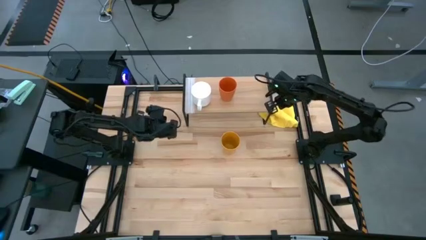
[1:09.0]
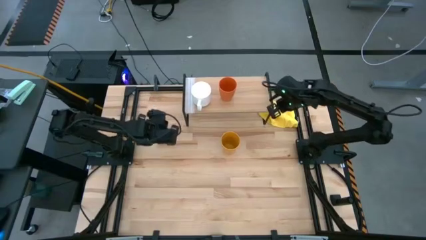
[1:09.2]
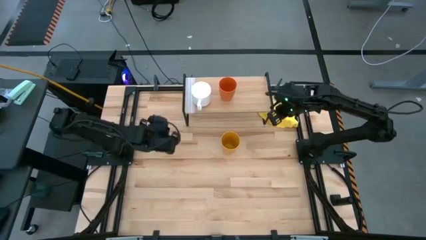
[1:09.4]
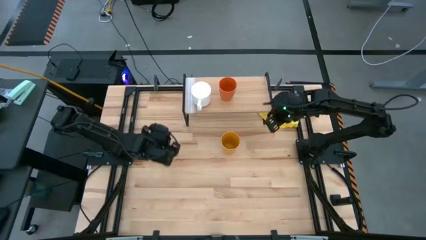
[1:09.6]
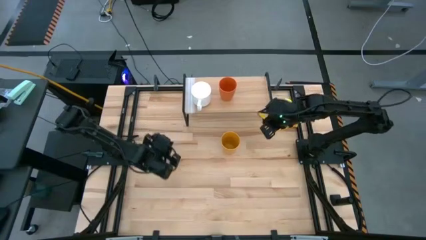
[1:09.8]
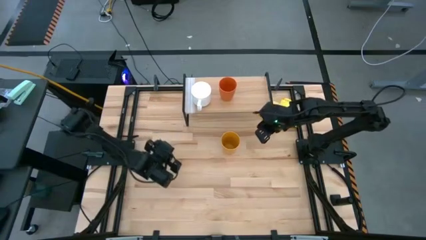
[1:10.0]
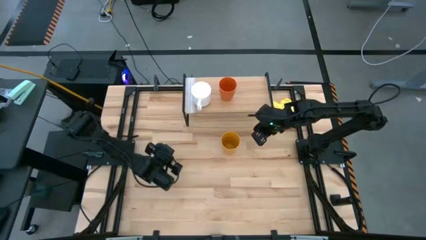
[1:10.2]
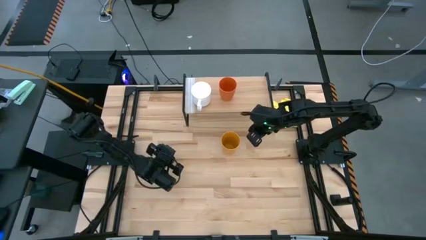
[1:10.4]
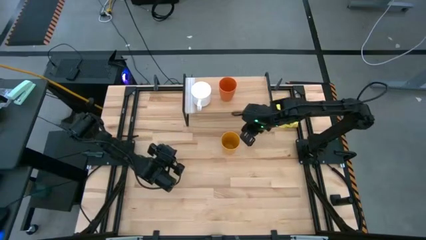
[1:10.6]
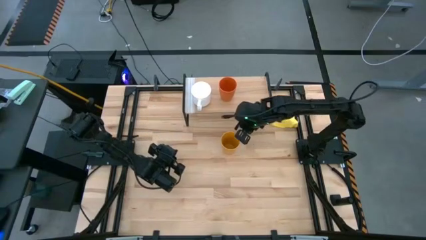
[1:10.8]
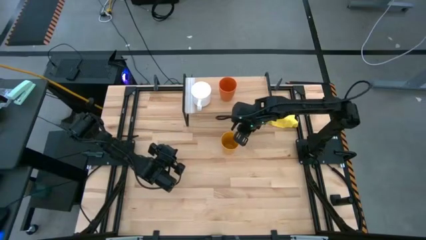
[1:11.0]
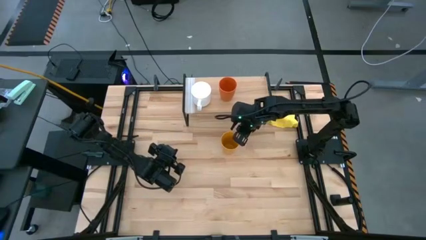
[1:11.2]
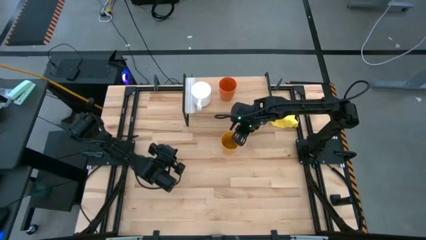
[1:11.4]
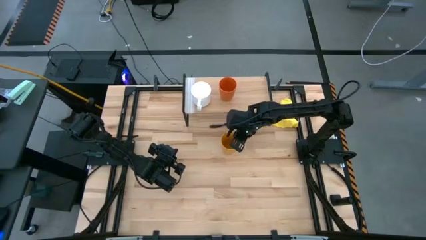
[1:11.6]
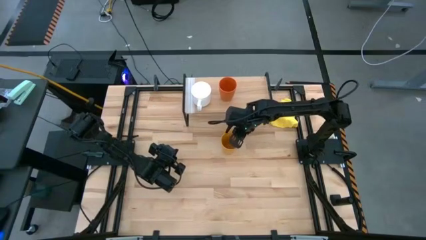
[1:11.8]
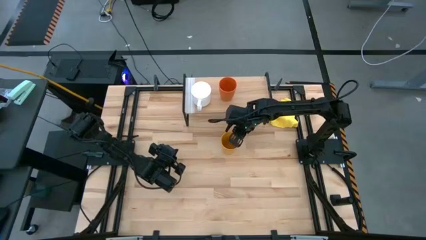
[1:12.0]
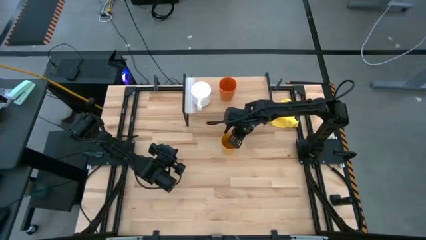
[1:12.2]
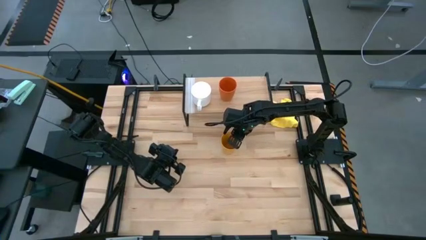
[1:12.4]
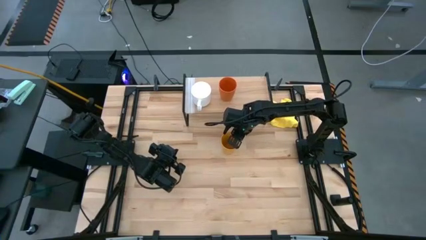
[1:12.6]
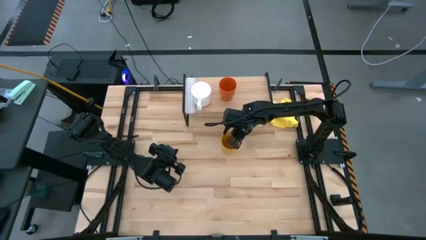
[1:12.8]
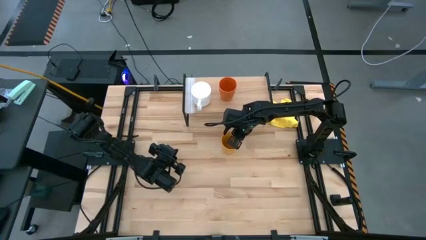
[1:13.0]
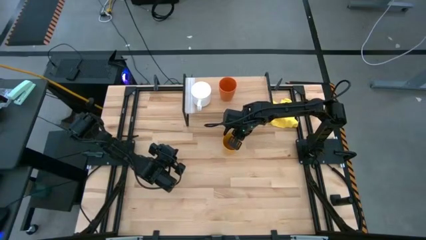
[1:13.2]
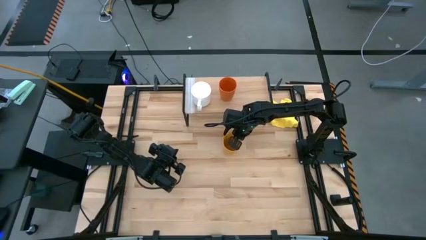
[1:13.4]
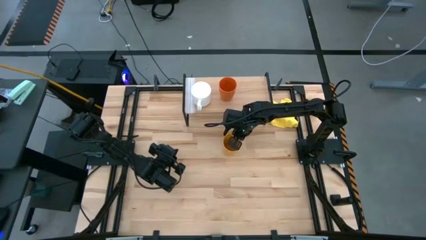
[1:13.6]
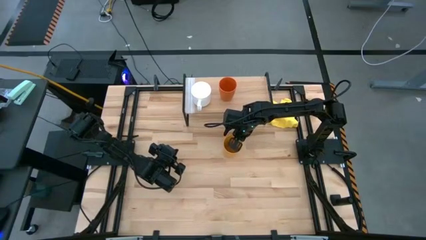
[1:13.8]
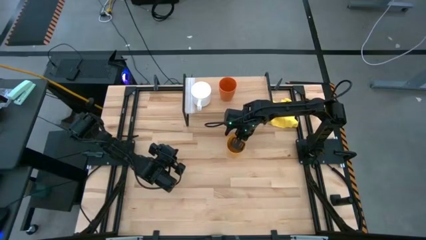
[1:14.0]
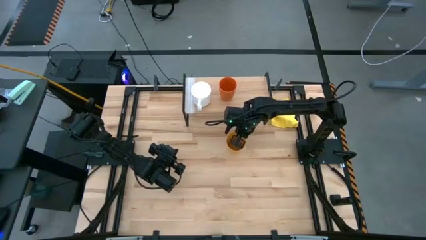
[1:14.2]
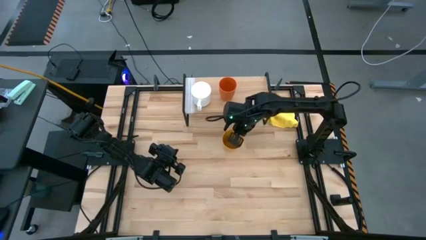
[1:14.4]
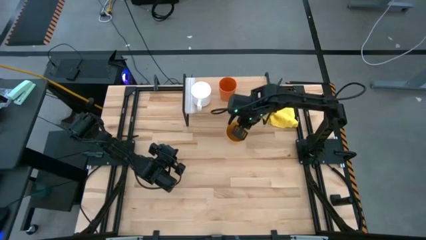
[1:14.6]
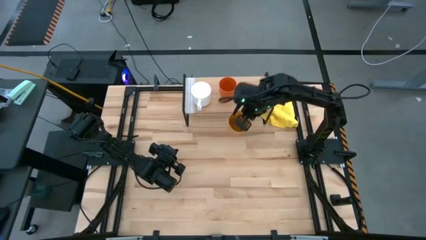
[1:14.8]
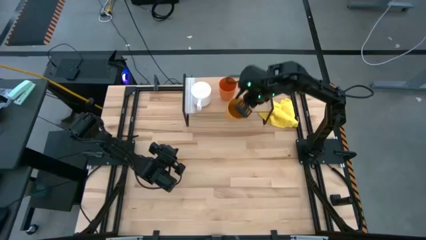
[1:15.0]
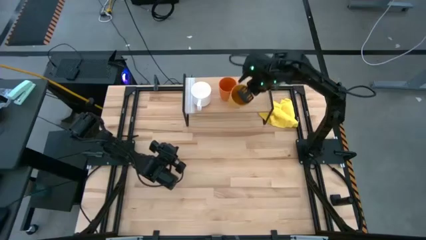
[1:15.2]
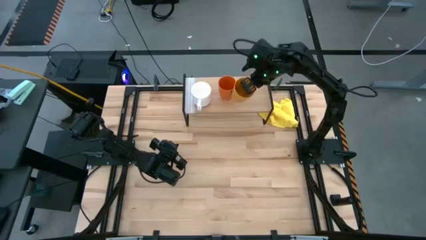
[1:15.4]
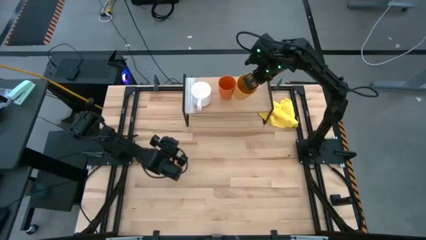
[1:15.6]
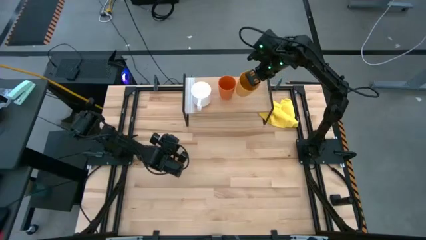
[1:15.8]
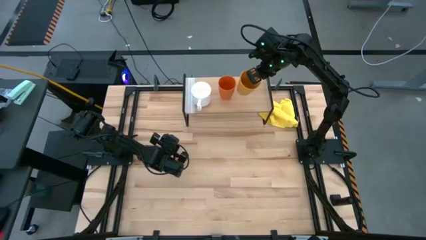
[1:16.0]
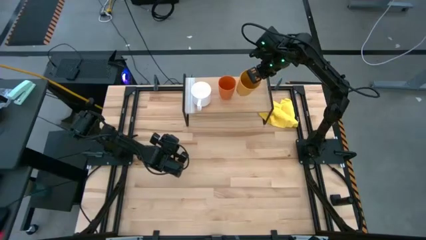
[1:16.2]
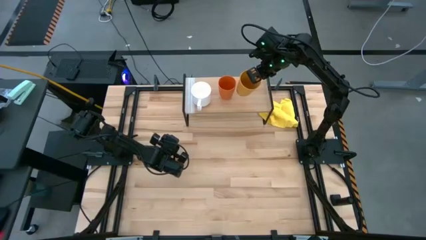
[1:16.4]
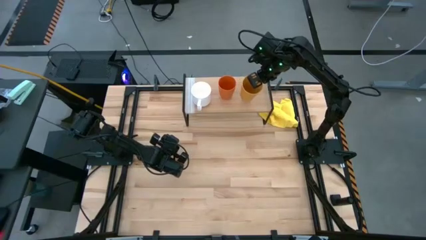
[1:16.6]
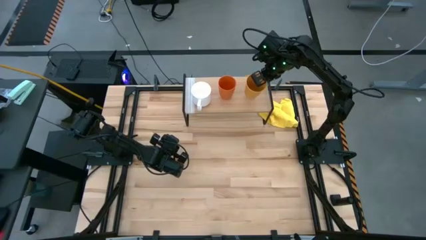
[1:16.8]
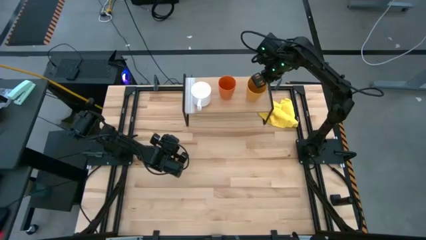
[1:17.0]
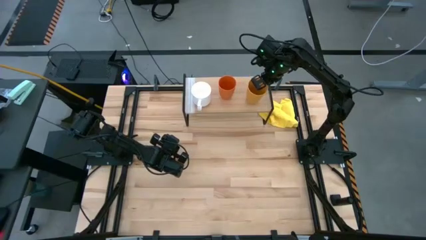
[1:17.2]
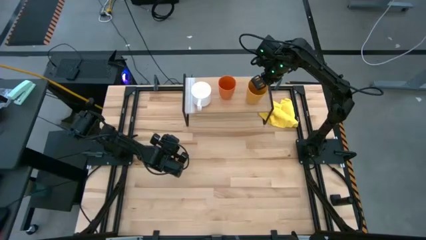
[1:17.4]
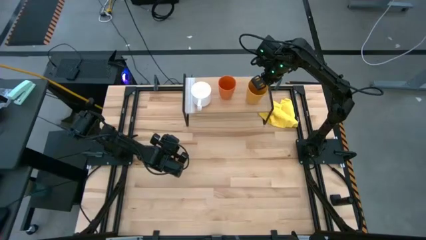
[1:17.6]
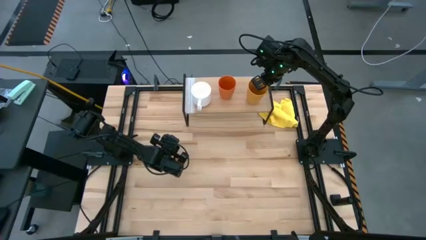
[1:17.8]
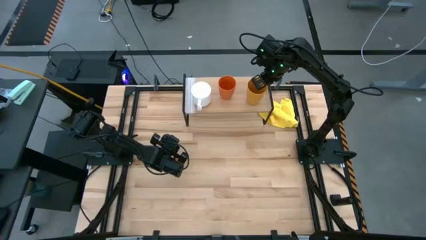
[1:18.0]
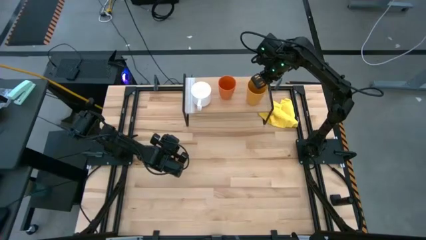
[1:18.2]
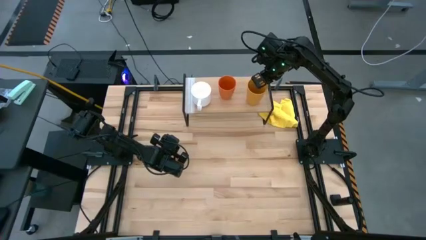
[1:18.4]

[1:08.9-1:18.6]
Task: Stack small to large cups/mugs on shelf
Put the yellow cup on the shelf

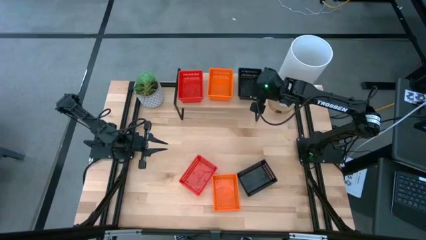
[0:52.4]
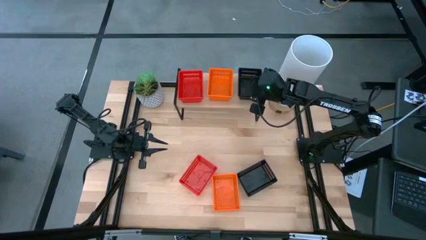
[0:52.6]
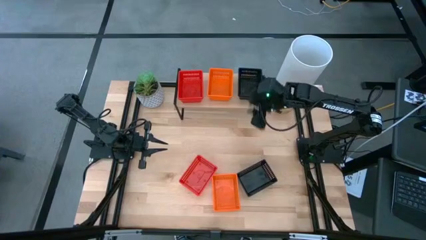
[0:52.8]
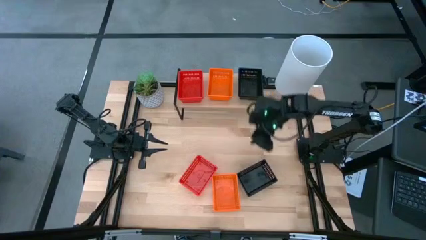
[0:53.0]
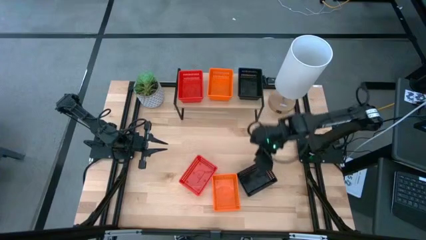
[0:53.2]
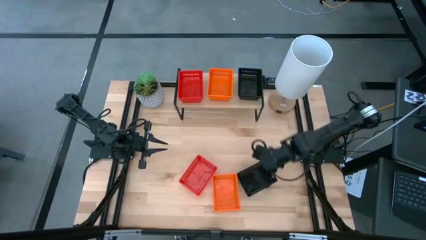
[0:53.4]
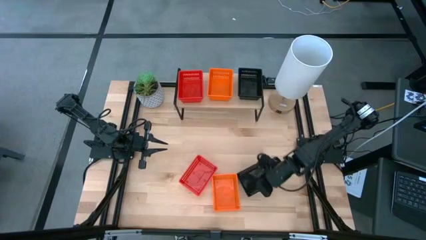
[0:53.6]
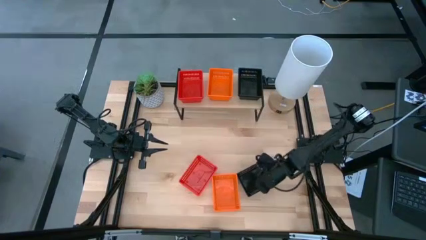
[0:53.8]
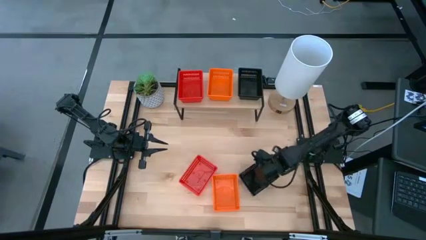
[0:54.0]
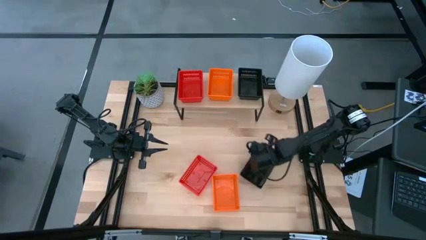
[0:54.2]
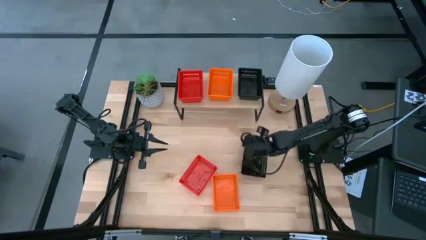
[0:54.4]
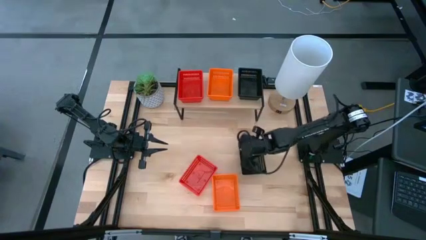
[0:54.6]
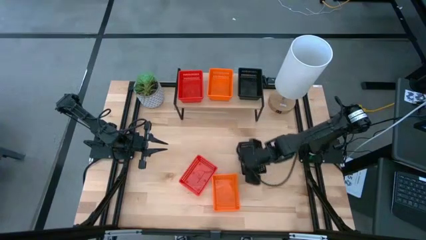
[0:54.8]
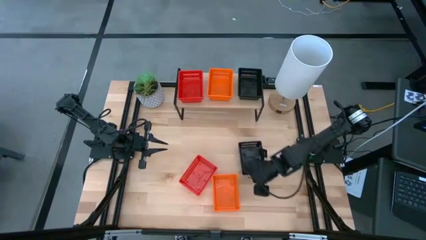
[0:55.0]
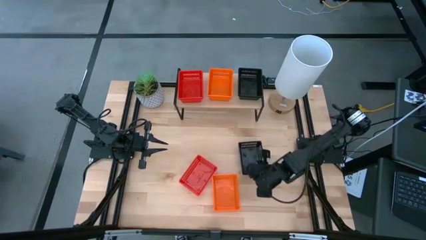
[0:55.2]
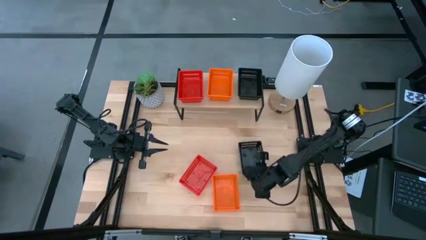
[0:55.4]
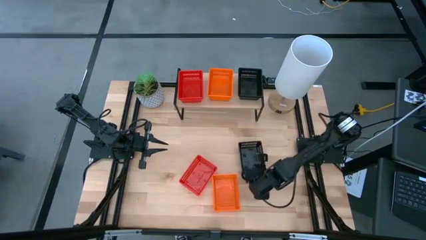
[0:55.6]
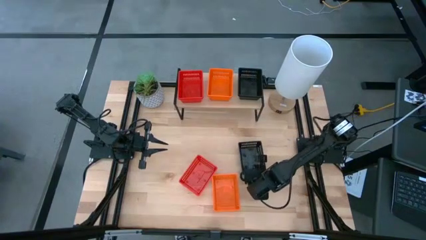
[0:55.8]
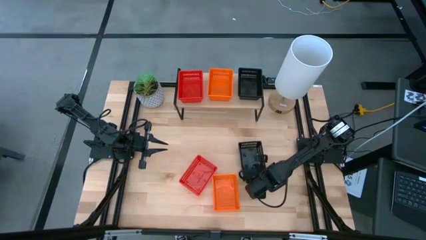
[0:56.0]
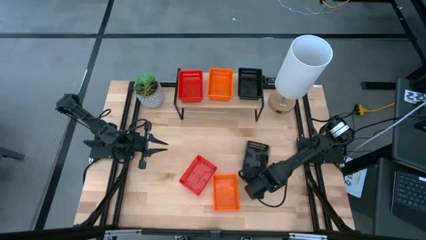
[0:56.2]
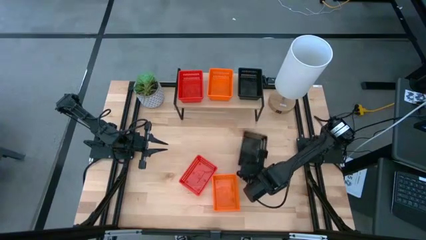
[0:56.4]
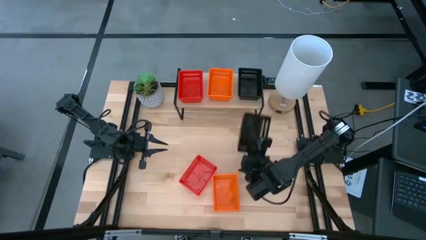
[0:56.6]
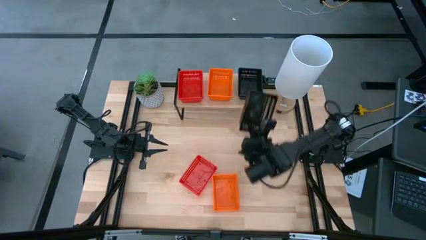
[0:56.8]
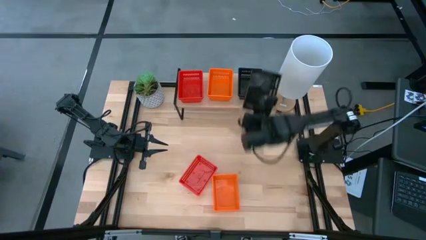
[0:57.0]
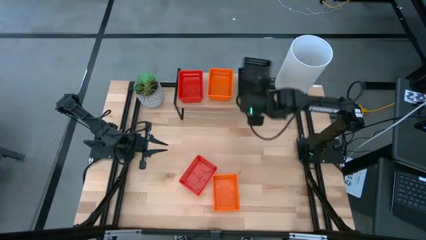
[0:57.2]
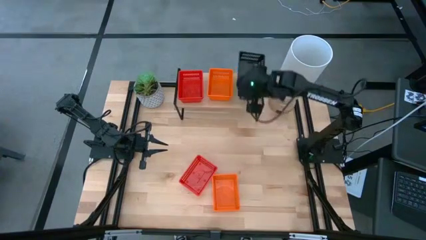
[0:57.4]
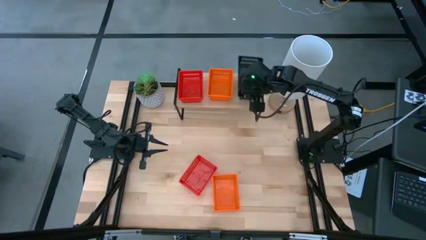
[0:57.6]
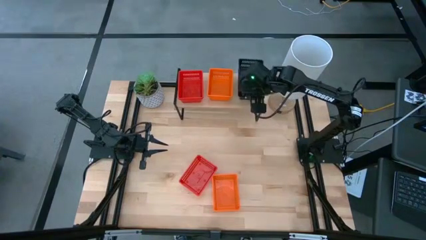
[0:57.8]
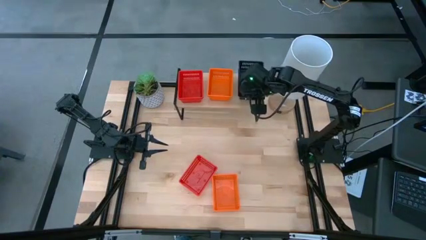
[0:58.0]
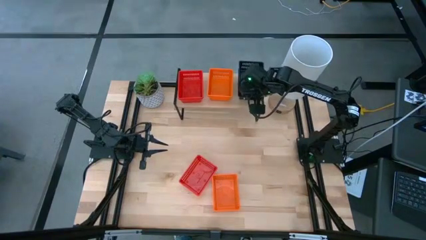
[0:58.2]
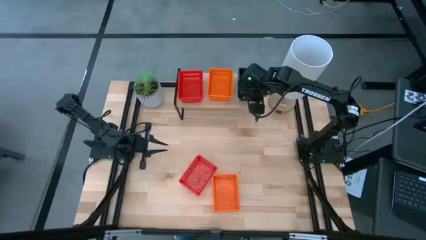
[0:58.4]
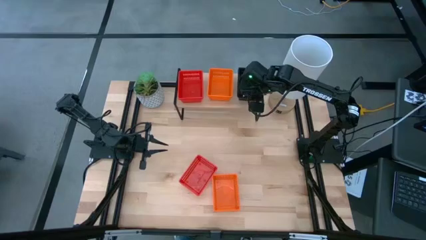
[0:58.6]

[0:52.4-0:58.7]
Task: Stack baskets on shelf by color
Stack the black basket on the black basket
